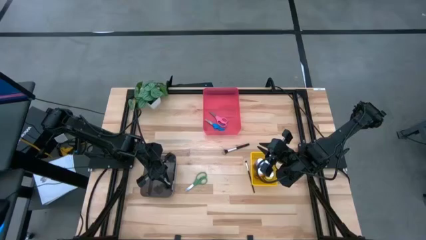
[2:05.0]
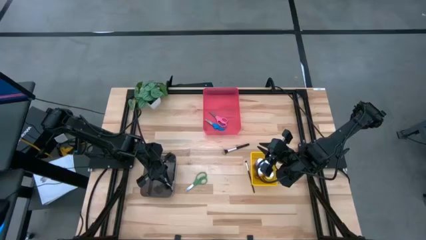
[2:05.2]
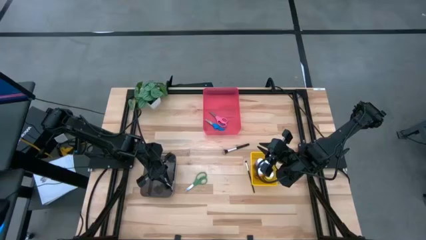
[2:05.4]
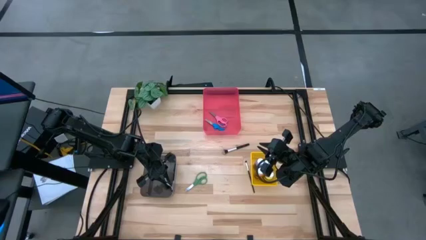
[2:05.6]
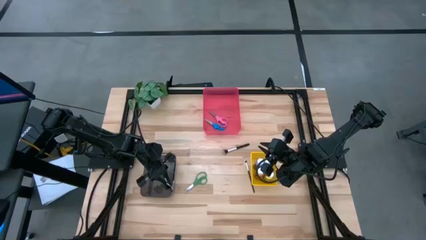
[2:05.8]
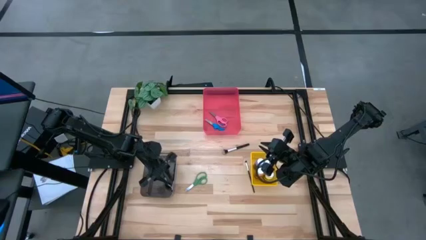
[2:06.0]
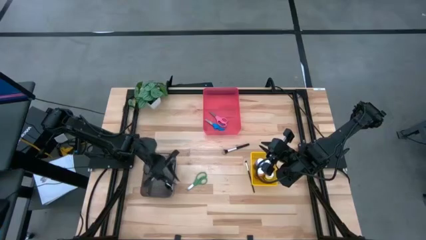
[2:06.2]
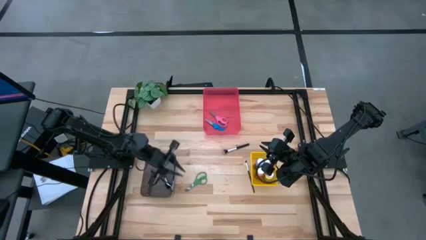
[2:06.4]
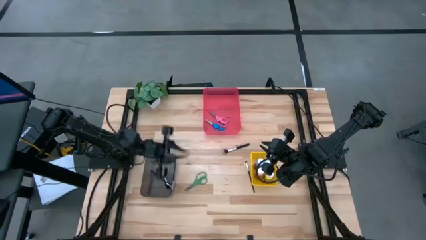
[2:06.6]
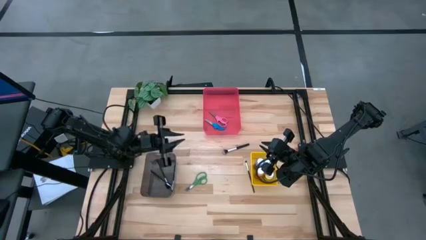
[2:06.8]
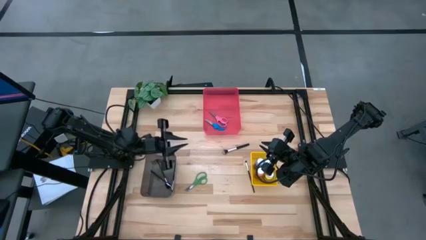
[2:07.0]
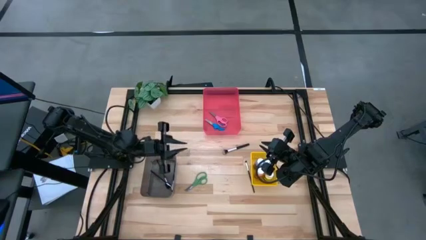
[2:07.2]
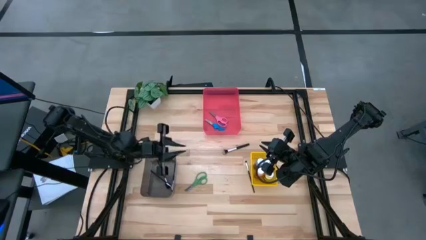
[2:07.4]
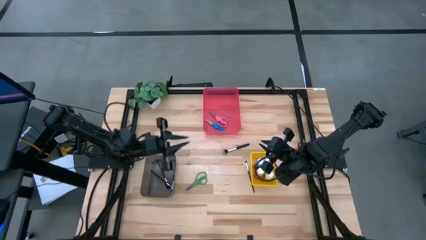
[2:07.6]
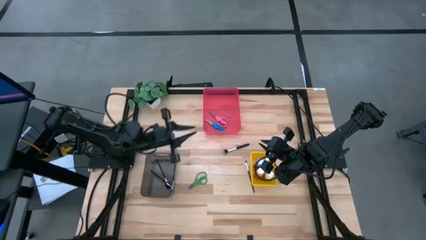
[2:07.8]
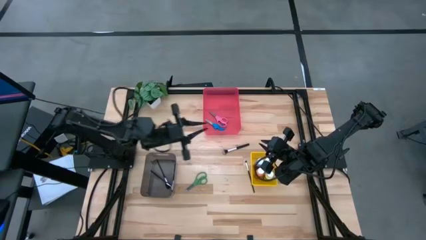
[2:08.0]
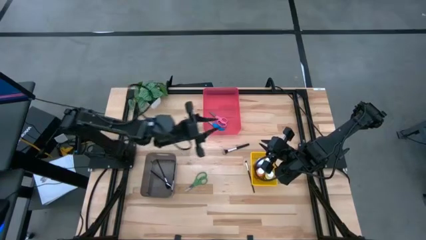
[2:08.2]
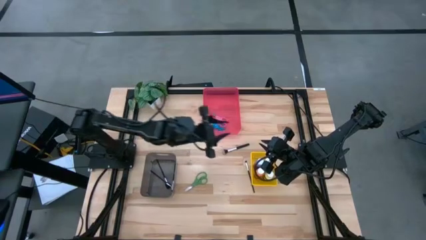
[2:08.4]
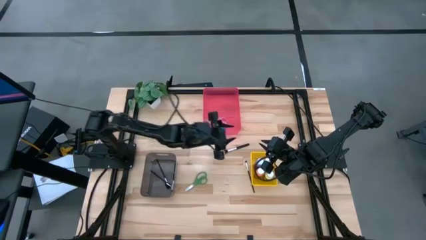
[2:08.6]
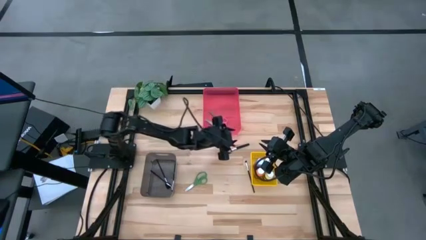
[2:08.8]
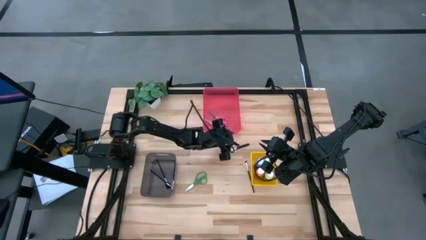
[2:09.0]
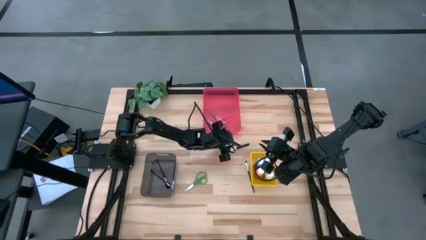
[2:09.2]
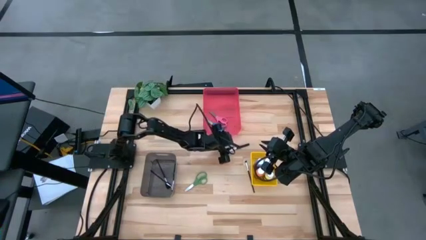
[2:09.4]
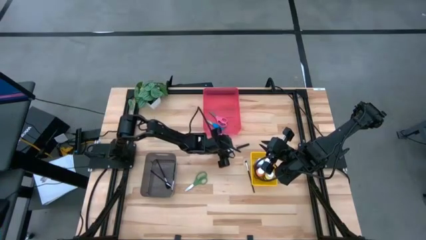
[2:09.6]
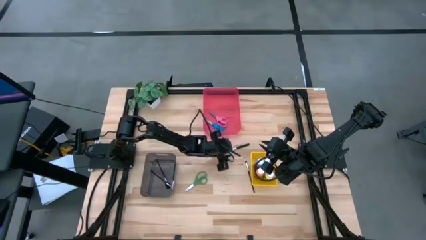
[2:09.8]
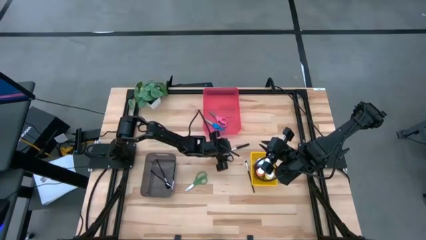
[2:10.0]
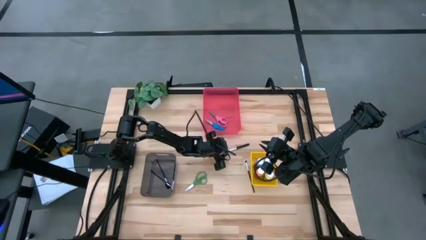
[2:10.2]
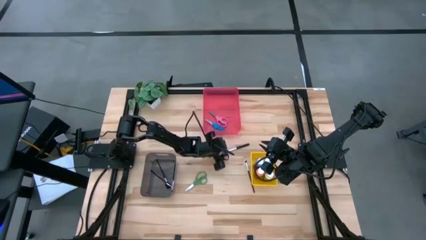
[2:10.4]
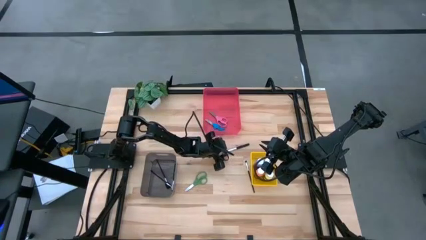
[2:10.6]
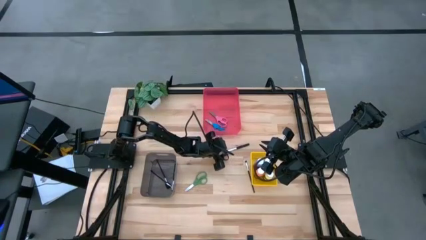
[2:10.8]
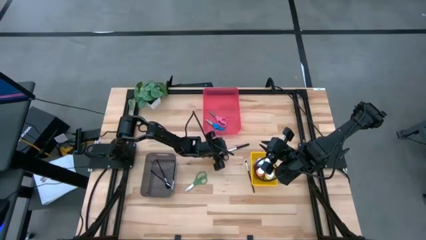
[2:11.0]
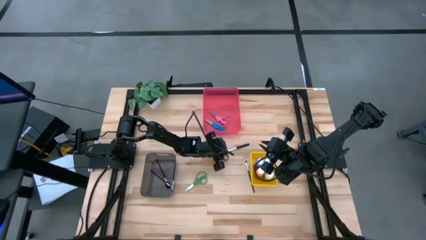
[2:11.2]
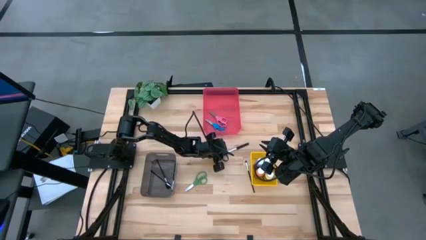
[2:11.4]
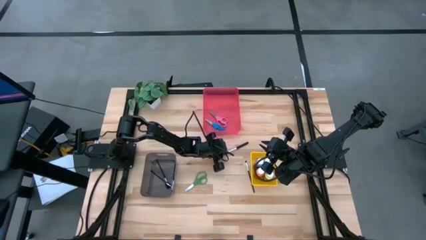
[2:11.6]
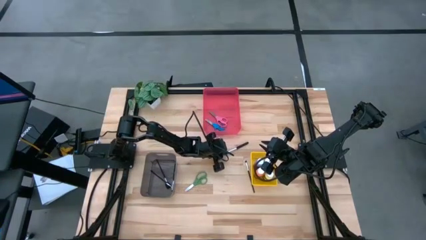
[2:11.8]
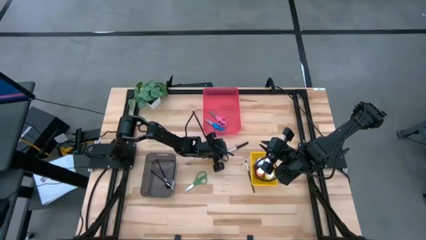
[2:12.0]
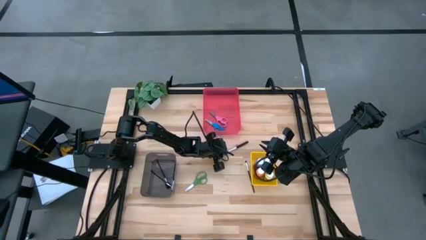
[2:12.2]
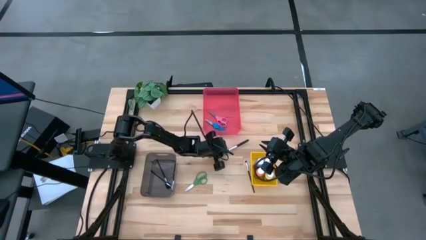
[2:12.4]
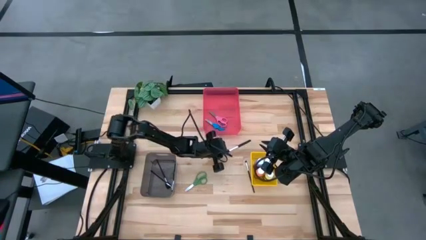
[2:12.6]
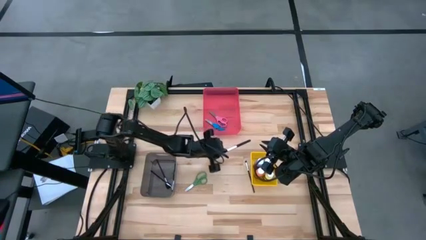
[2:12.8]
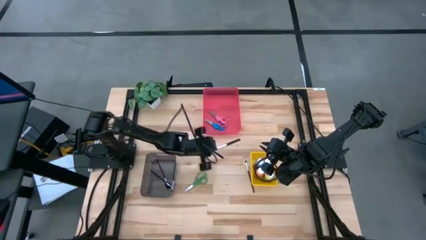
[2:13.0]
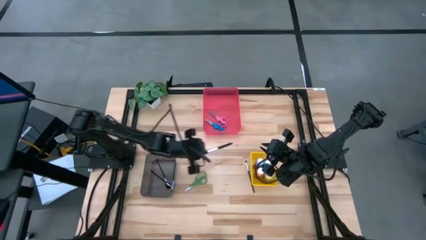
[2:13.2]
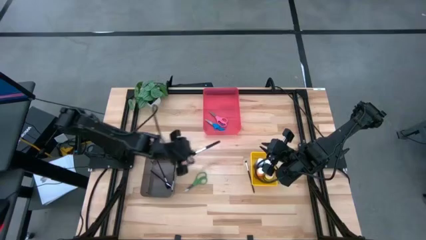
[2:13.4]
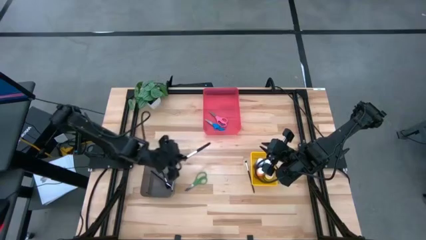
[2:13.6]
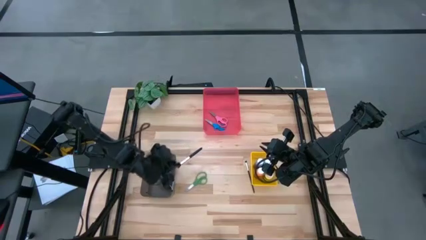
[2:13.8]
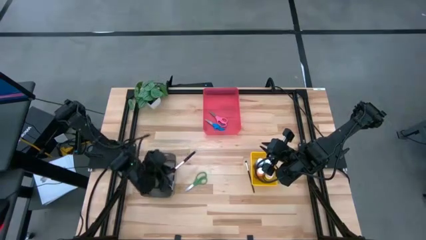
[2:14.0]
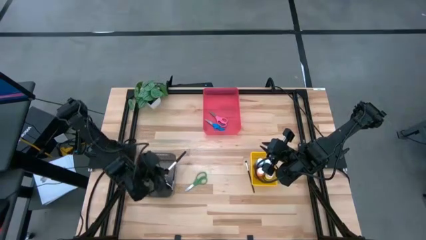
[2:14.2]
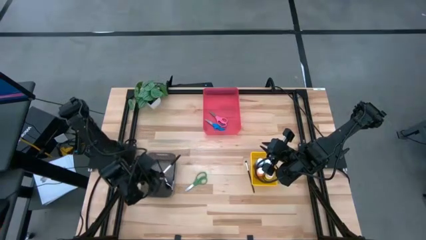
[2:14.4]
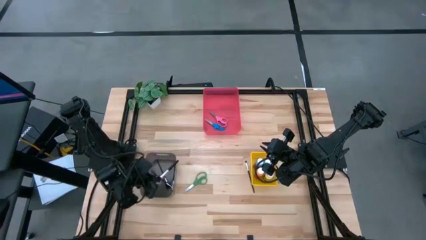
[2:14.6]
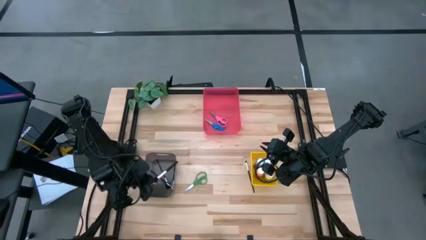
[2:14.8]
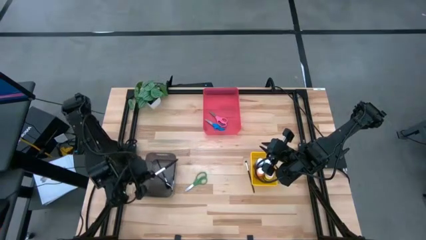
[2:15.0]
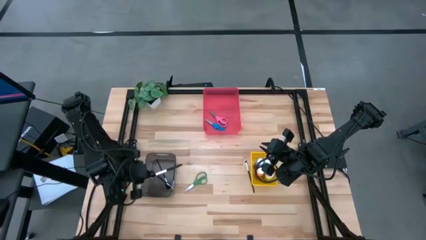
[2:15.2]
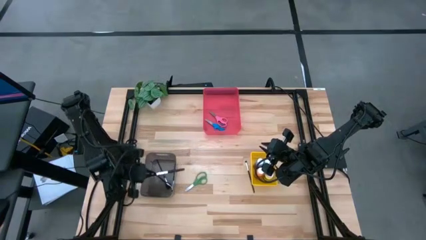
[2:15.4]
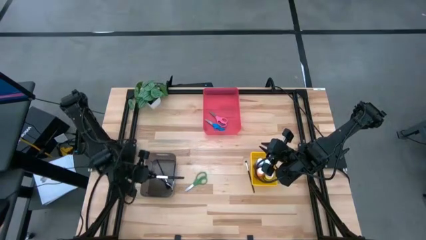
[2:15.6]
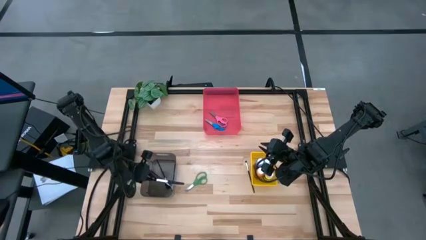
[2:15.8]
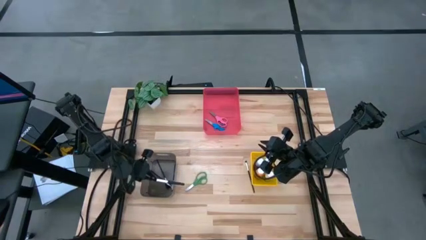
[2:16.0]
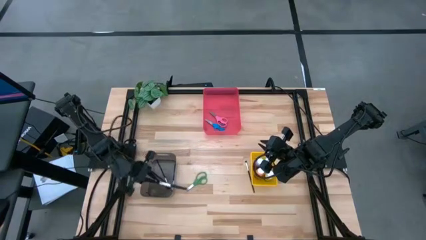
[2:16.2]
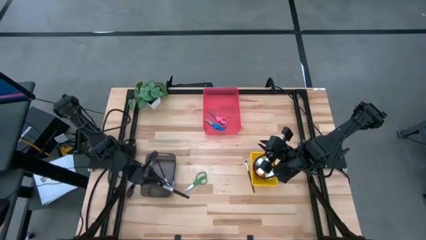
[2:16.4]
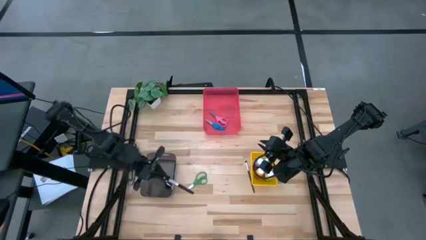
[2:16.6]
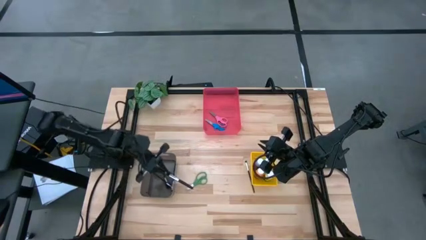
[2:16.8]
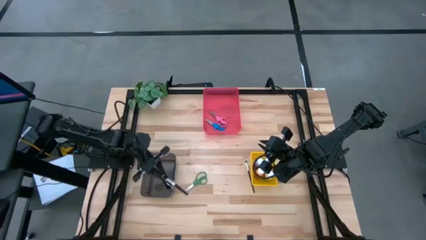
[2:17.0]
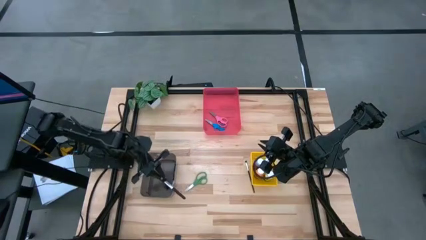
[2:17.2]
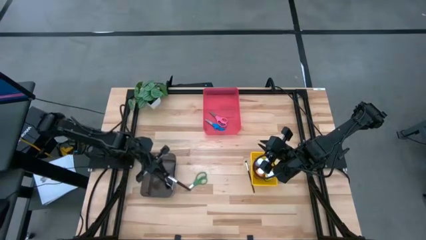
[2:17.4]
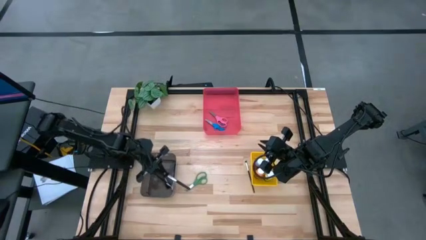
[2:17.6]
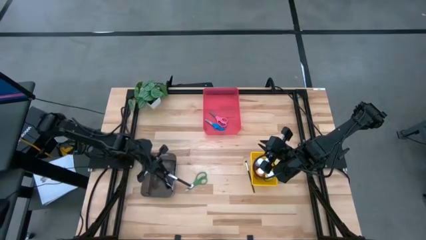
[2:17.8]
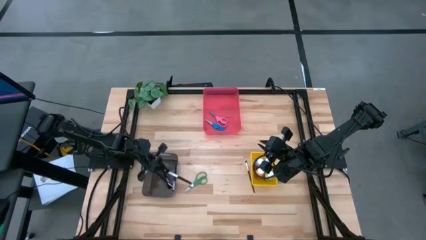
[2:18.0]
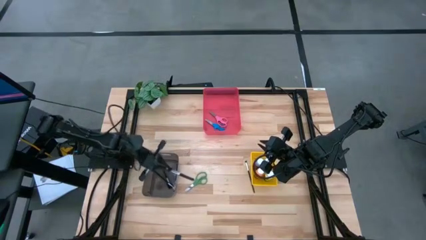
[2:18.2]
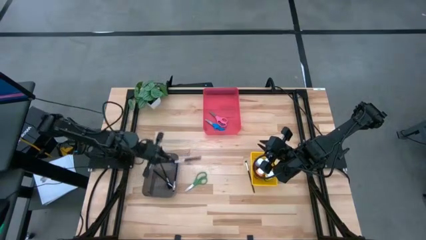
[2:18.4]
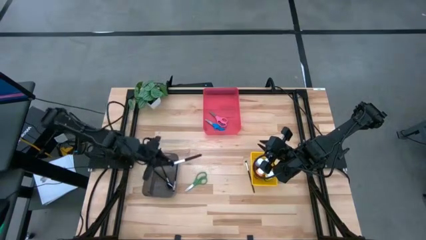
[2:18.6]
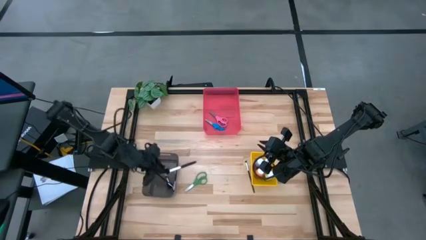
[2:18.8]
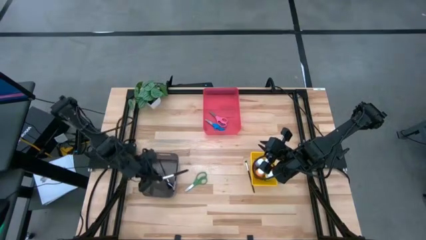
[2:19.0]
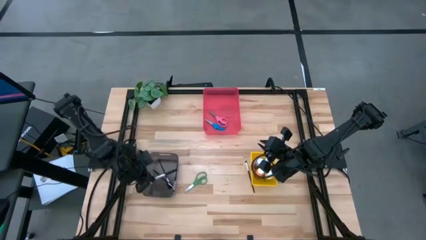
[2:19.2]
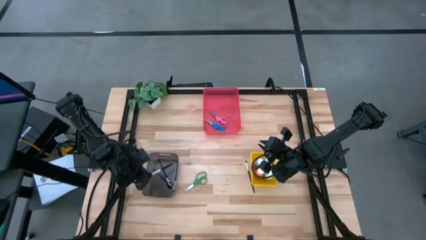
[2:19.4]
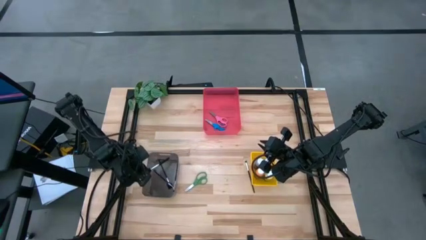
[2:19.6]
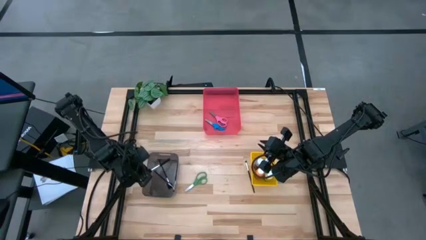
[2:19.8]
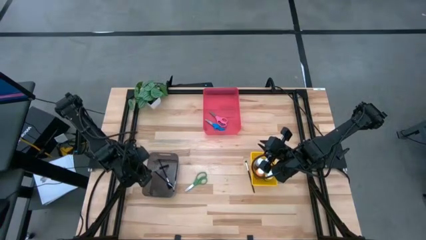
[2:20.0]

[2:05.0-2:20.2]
Task: Pick & Place Paint Supplies
Put the top black makeup brush into the black bin

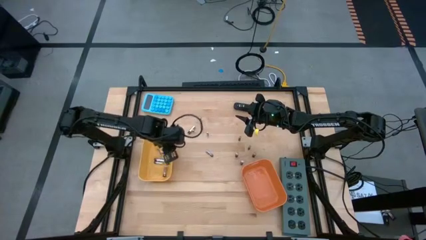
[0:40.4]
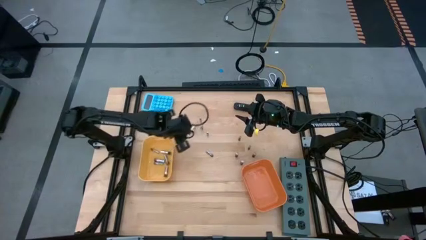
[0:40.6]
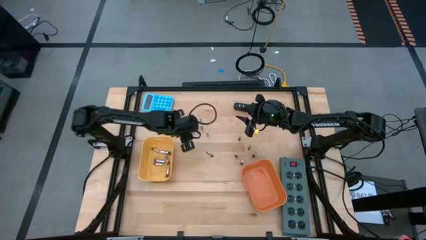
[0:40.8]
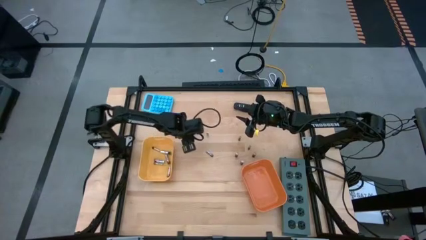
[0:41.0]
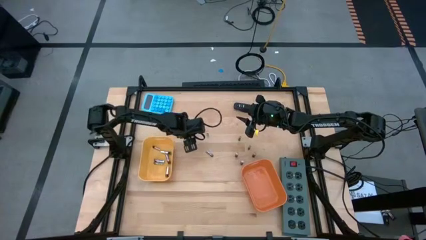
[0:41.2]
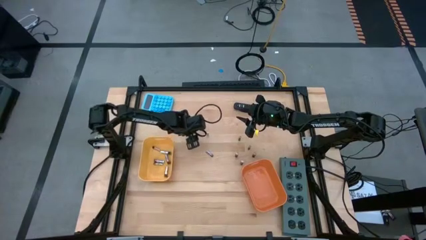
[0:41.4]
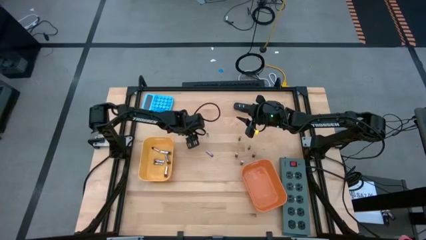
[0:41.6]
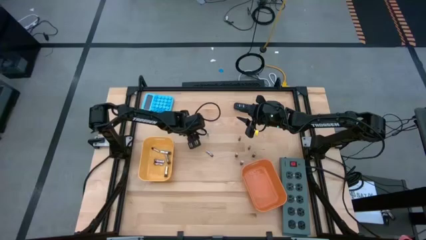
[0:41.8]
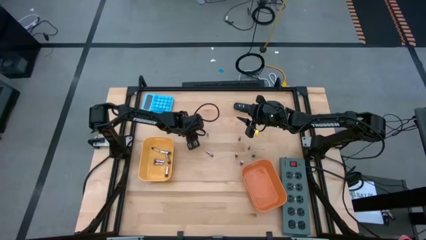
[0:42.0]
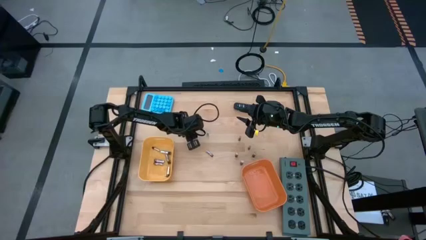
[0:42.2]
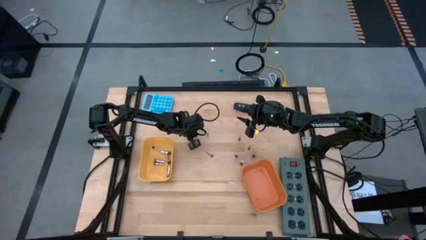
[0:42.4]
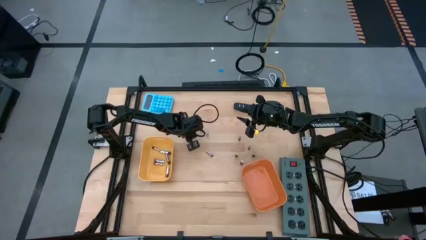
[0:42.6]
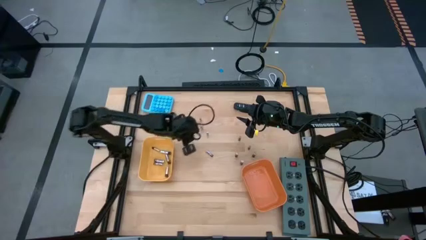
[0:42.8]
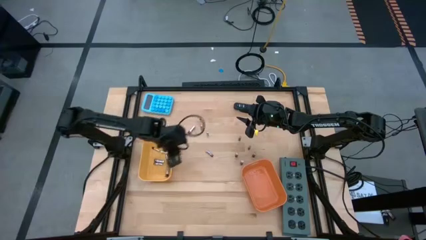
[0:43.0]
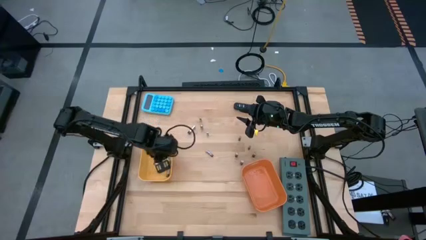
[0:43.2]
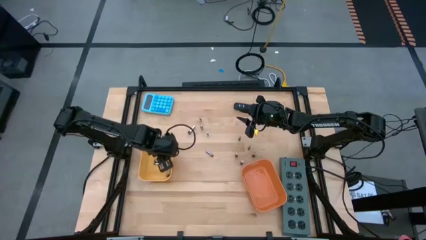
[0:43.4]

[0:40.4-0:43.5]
Task: Sort batteries
Put the silver battery into the yellow bin
